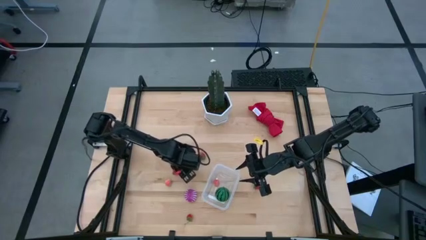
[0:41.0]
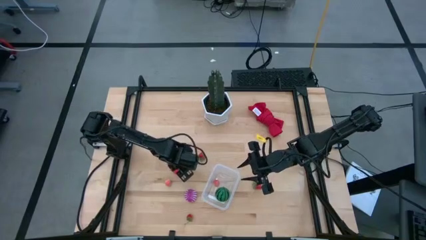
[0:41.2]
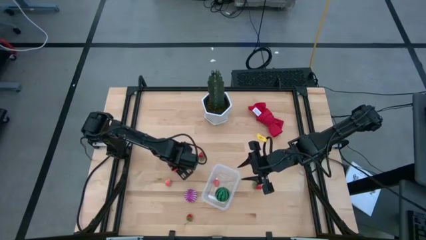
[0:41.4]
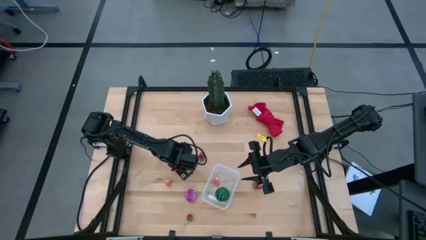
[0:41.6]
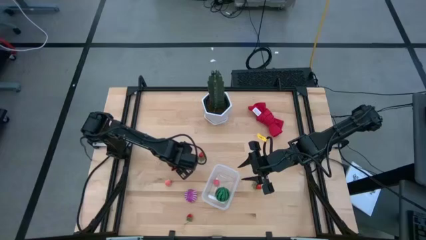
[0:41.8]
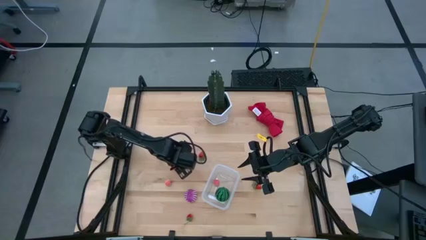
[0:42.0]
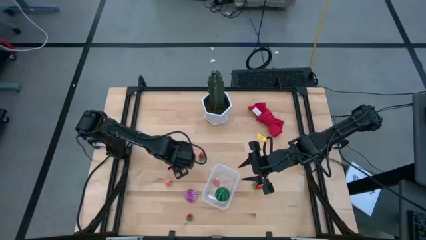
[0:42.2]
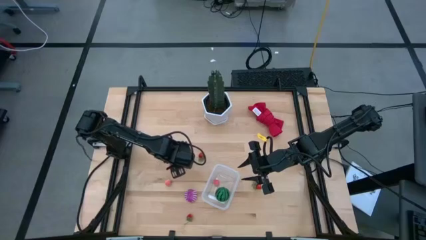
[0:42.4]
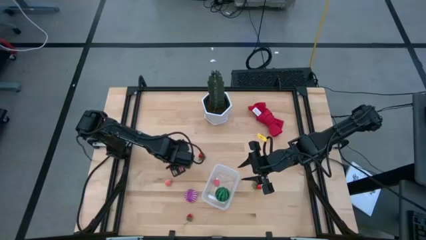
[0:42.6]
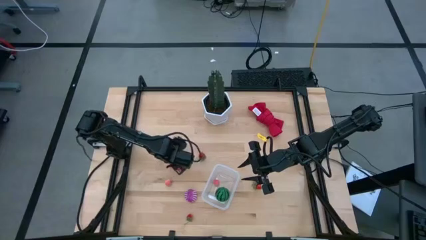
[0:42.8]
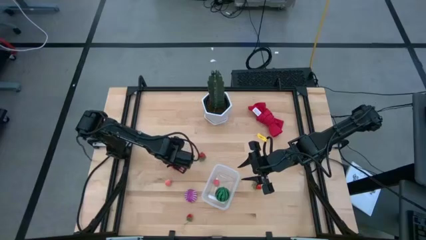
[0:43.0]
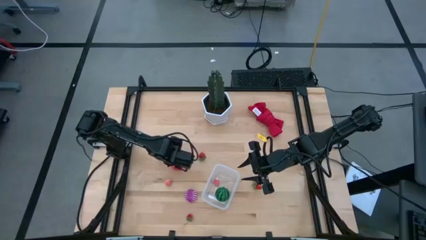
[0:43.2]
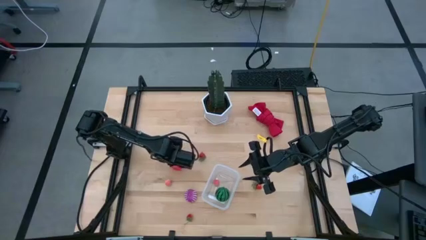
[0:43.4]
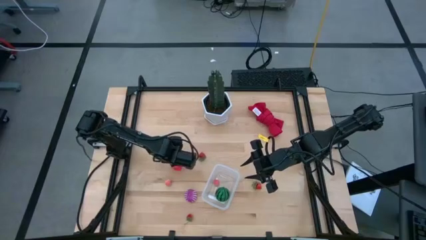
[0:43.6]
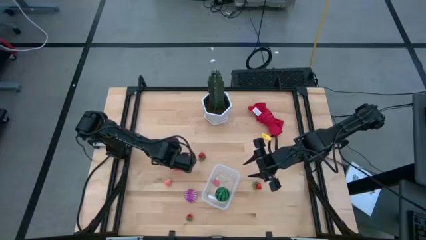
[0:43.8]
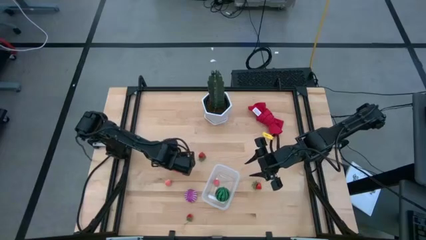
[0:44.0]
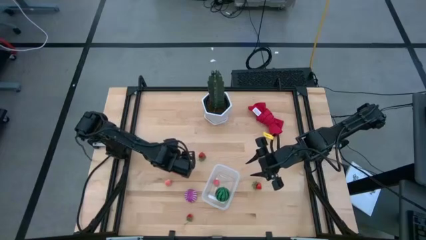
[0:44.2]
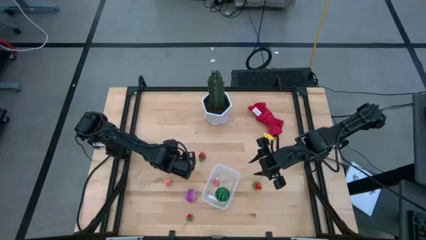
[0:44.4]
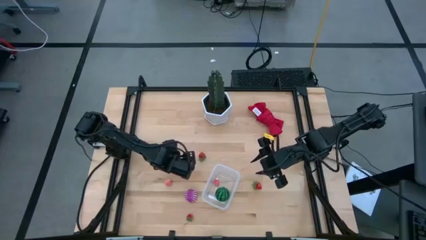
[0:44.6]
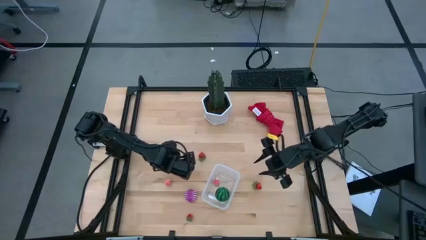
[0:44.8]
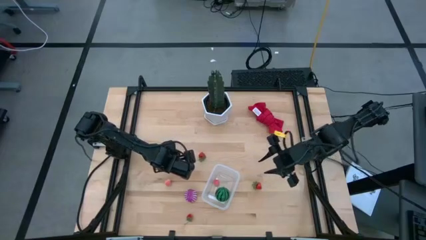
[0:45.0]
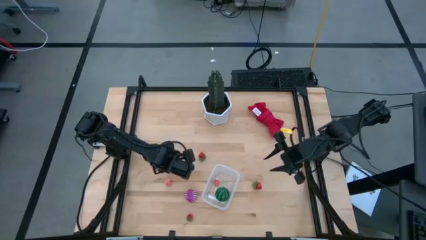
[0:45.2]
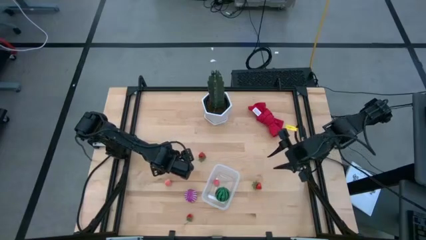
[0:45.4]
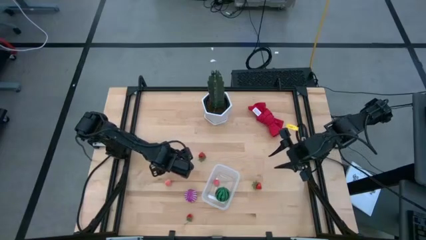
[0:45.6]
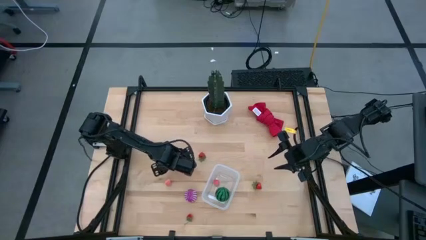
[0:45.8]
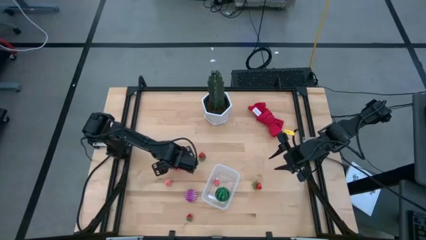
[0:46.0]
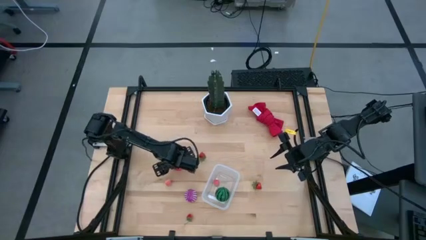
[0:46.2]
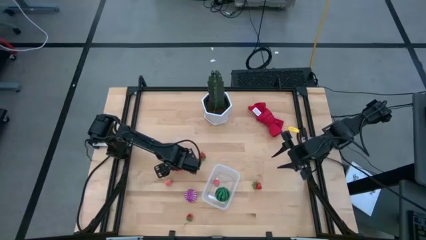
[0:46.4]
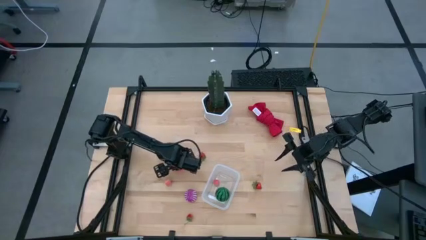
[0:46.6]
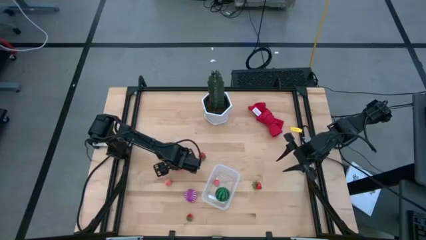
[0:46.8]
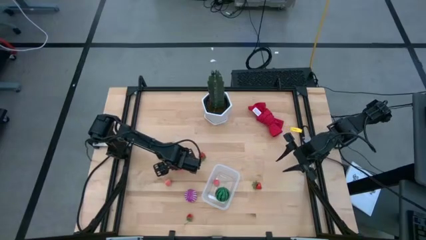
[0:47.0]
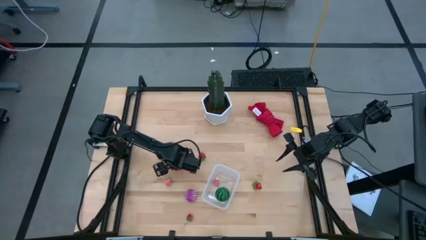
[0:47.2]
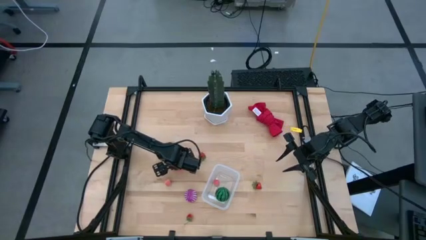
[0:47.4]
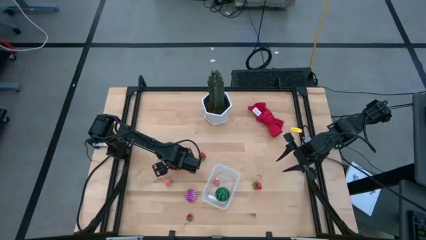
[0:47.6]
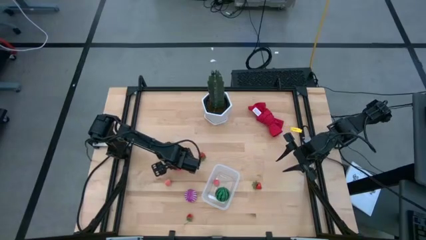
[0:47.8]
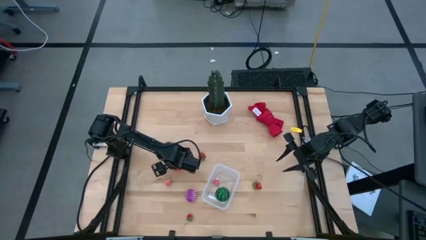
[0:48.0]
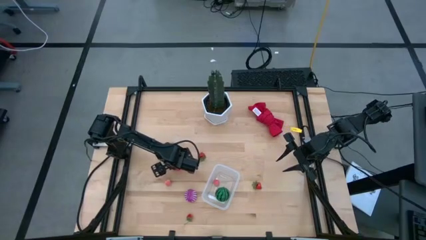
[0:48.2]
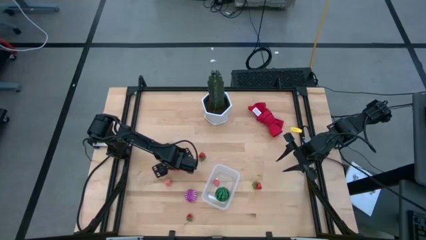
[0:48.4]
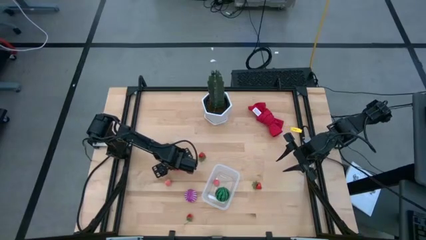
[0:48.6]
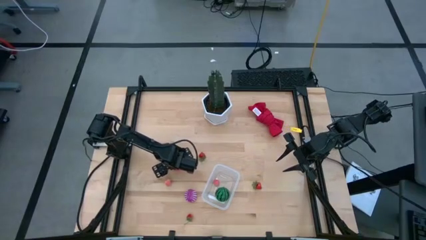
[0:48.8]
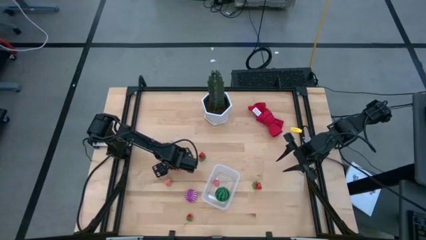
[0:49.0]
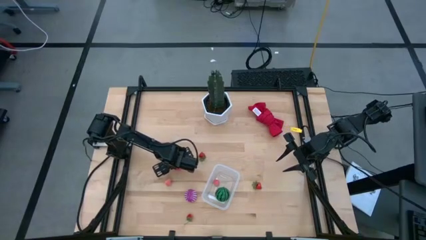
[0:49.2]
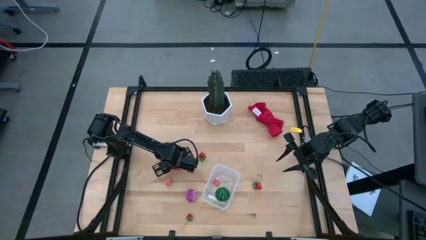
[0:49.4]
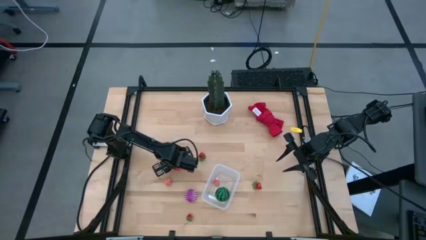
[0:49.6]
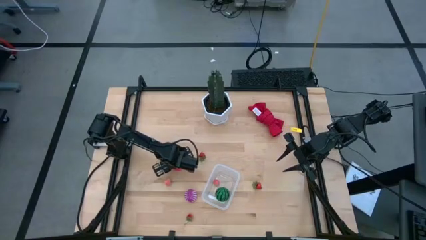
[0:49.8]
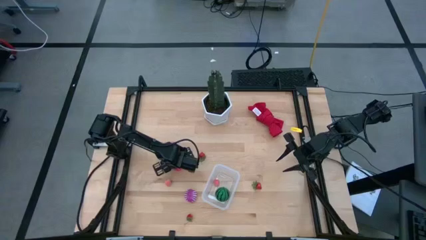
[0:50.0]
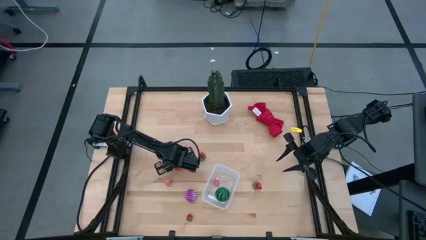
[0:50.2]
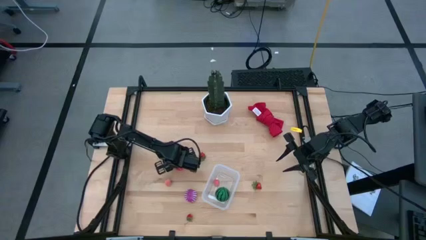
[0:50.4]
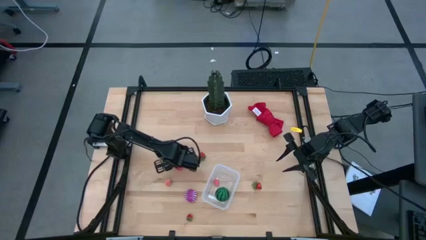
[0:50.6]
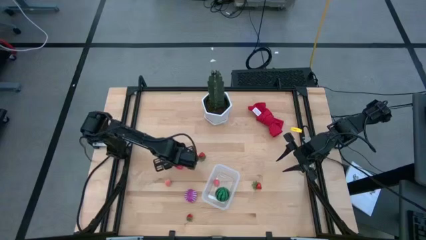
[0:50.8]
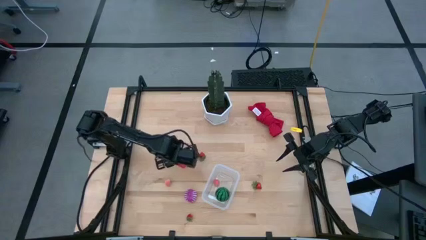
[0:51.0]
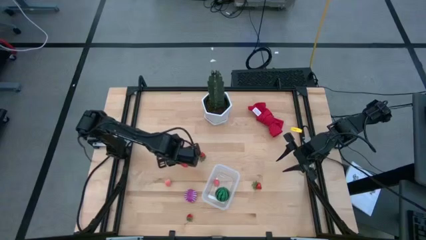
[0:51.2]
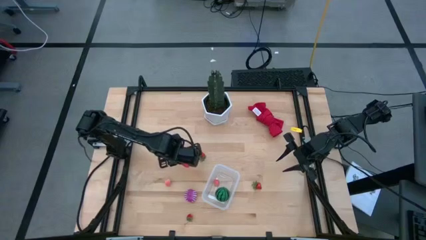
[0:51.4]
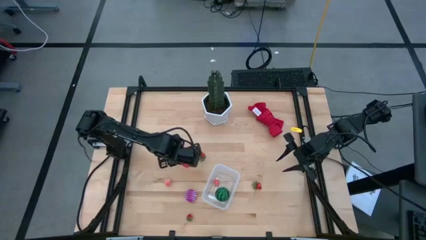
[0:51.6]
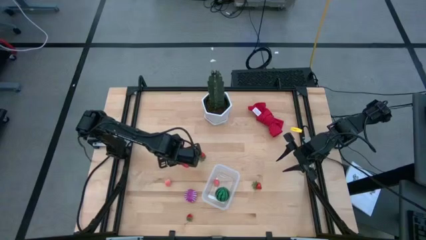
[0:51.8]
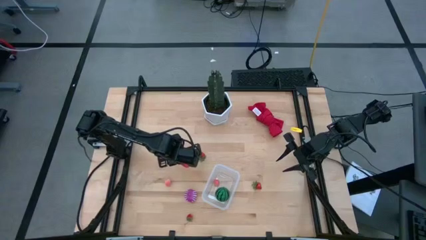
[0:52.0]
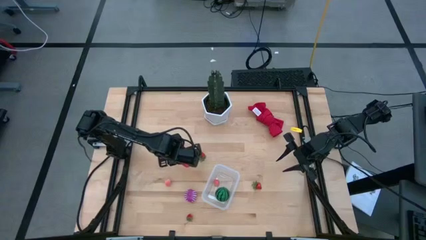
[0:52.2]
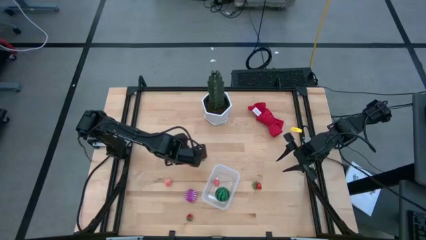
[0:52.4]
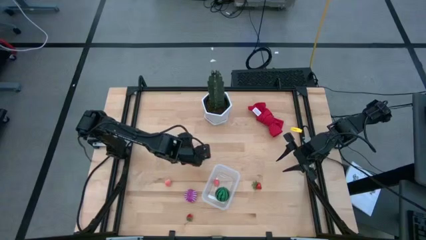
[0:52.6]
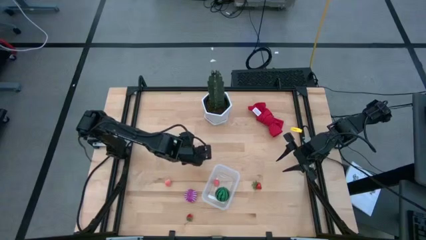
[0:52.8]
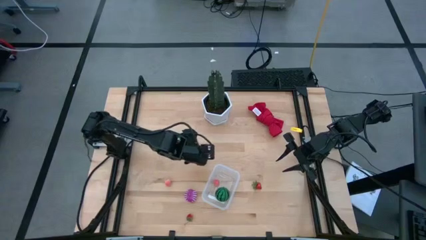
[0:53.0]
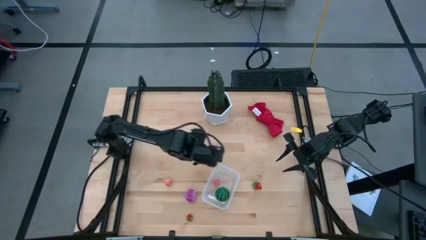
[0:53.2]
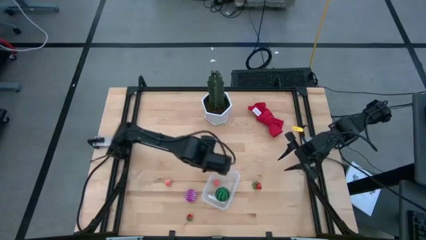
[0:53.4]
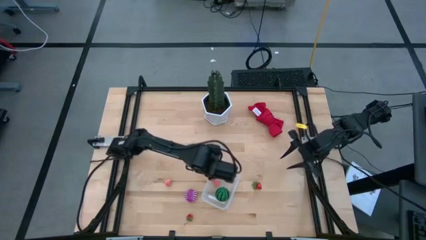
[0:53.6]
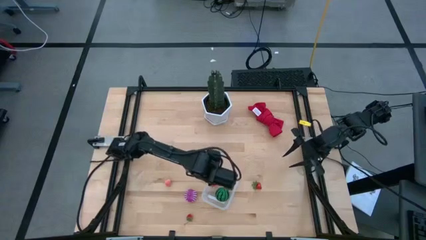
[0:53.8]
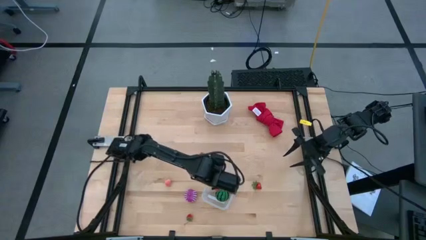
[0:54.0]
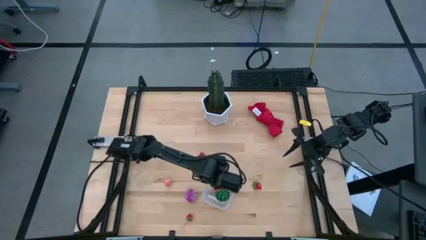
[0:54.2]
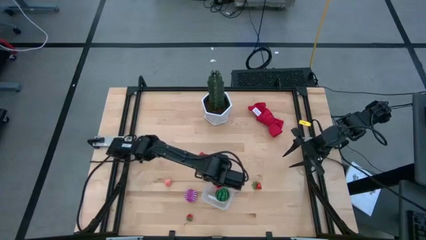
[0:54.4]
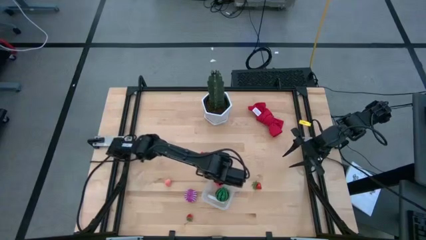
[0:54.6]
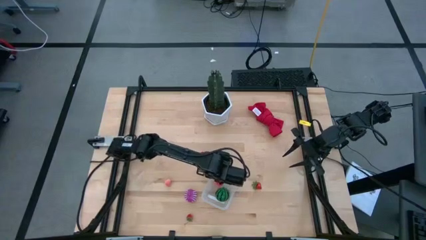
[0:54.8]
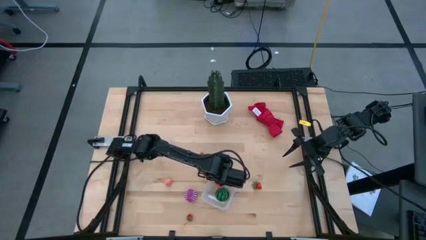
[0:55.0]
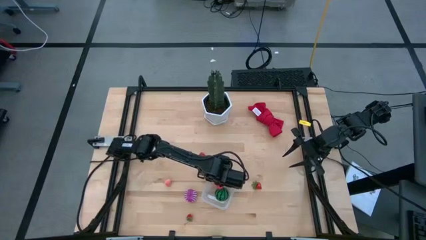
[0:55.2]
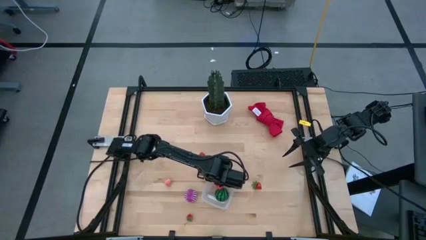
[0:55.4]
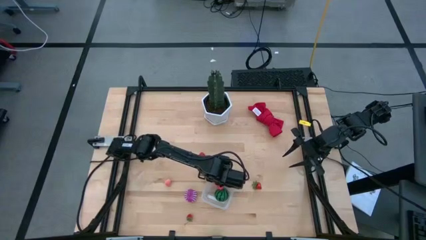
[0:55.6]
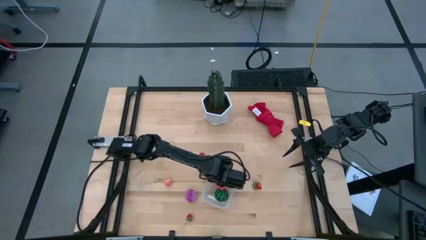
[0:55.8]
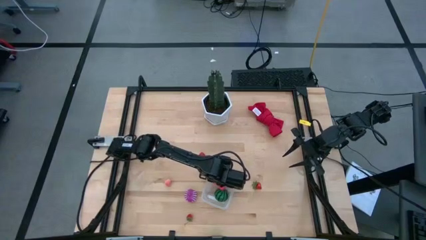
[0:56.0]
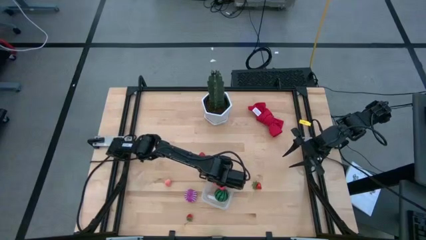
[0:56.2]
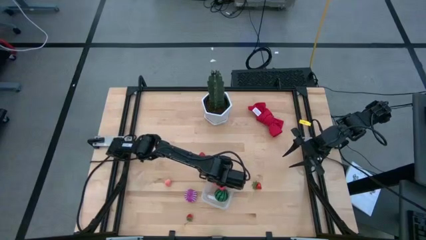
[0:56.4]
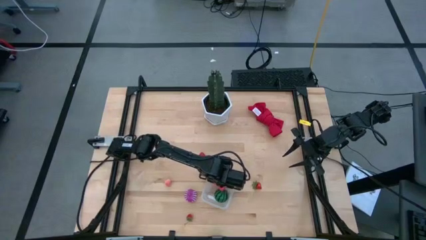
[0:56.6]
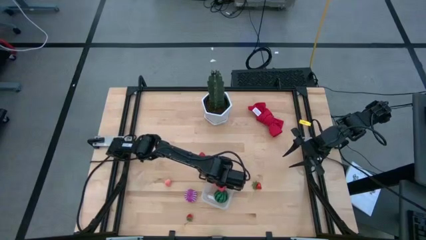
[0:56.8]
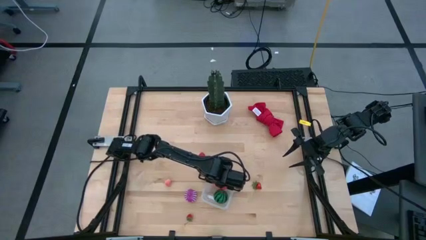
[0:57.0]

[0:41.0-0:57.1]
Task: Pick and placing Produce into tupperware
Put the red dragon fruit into the transparent bin
